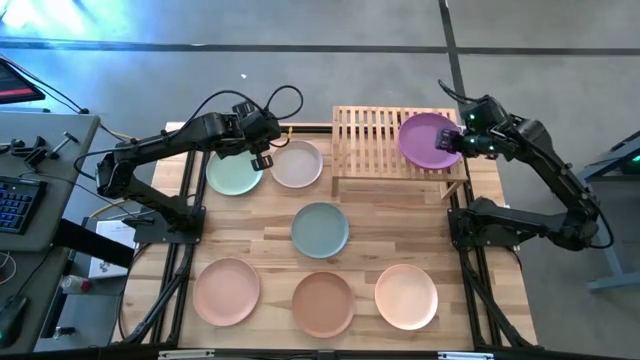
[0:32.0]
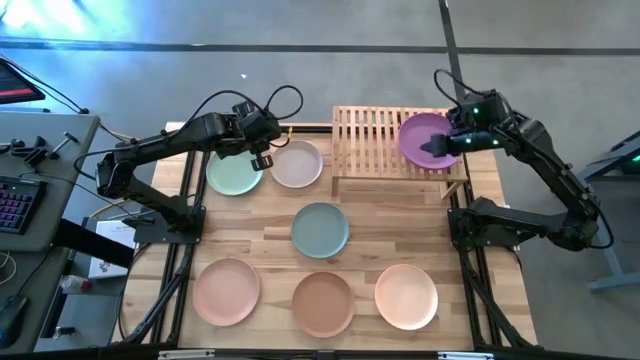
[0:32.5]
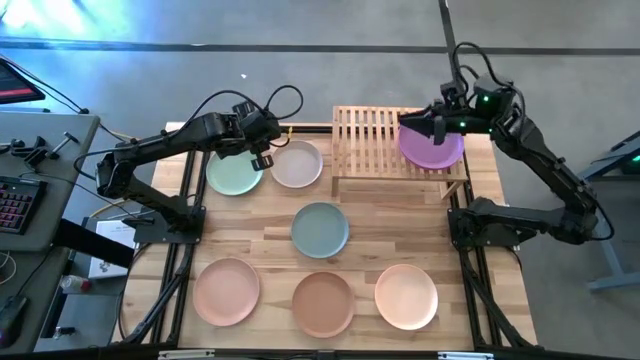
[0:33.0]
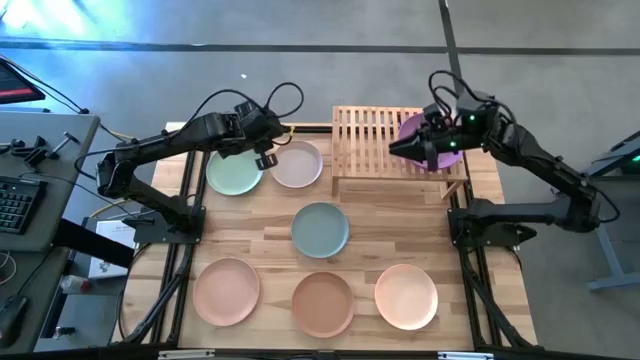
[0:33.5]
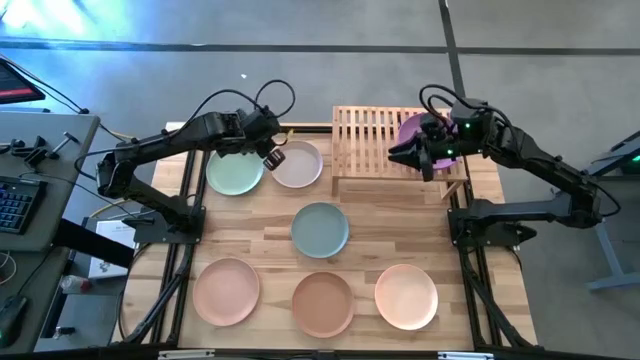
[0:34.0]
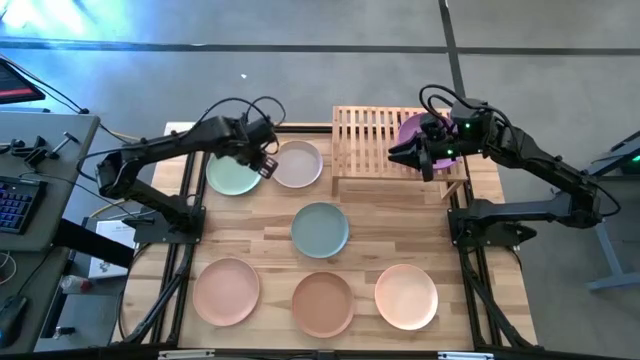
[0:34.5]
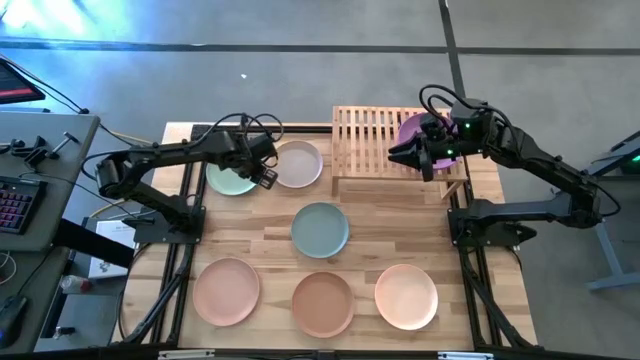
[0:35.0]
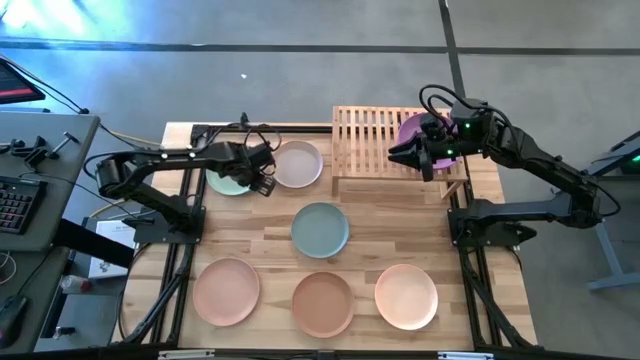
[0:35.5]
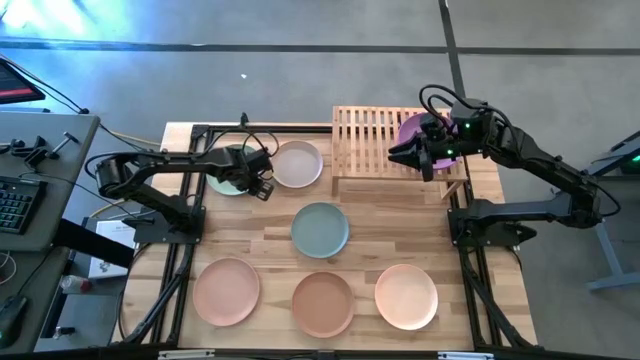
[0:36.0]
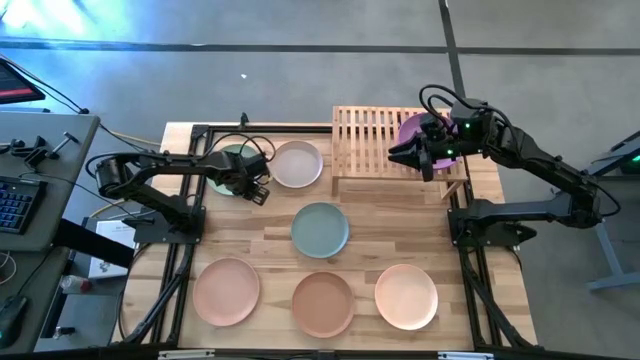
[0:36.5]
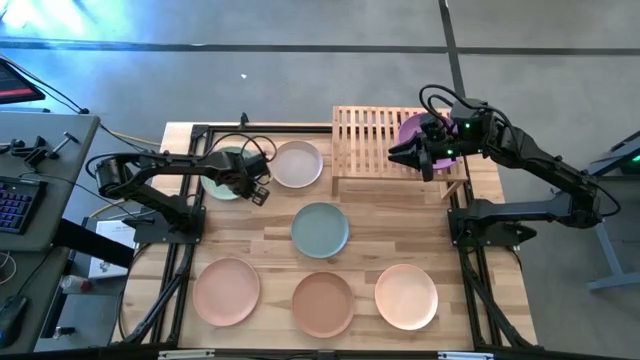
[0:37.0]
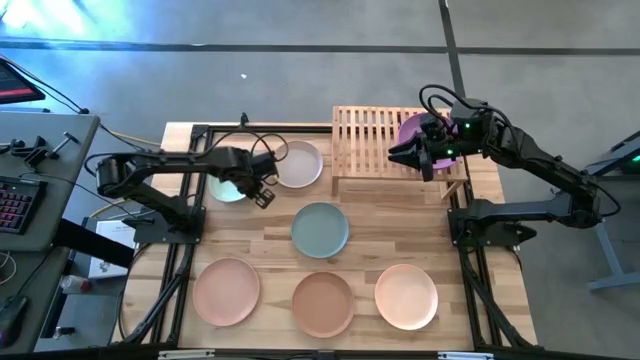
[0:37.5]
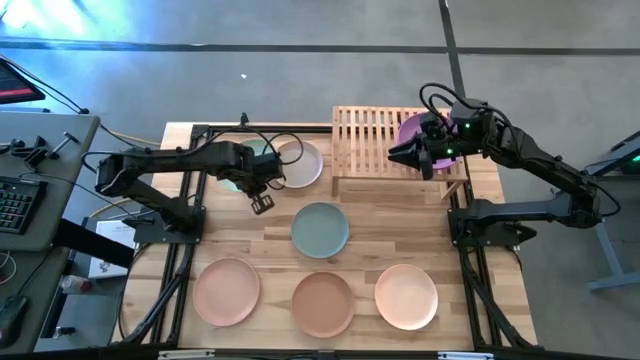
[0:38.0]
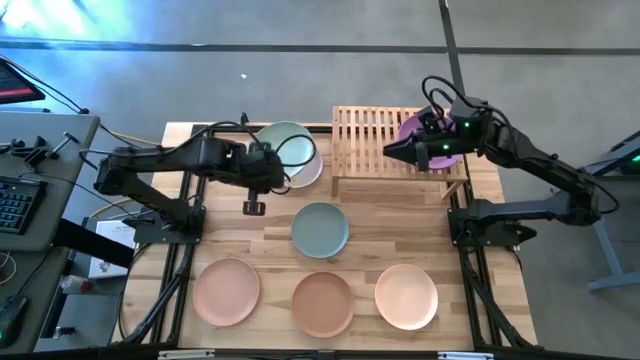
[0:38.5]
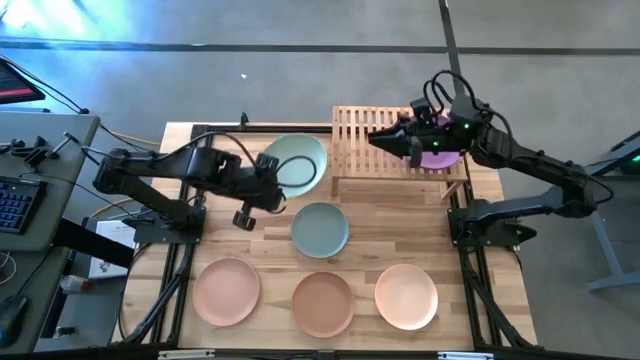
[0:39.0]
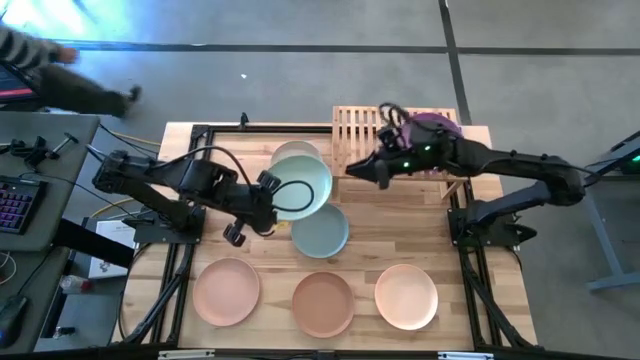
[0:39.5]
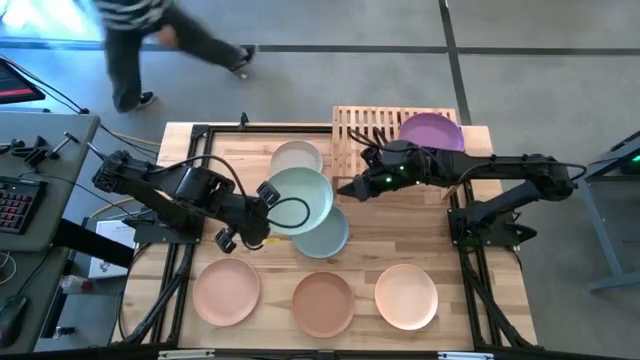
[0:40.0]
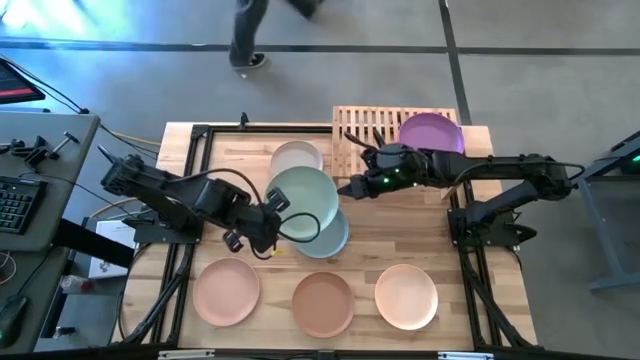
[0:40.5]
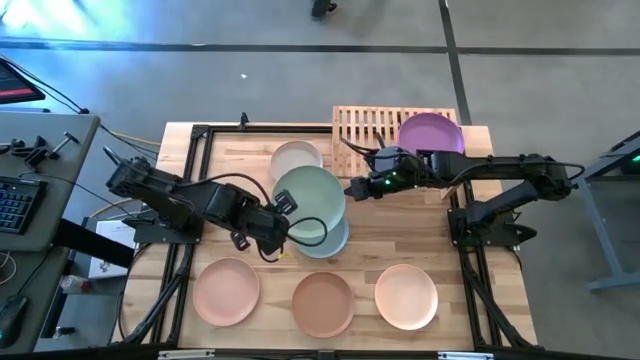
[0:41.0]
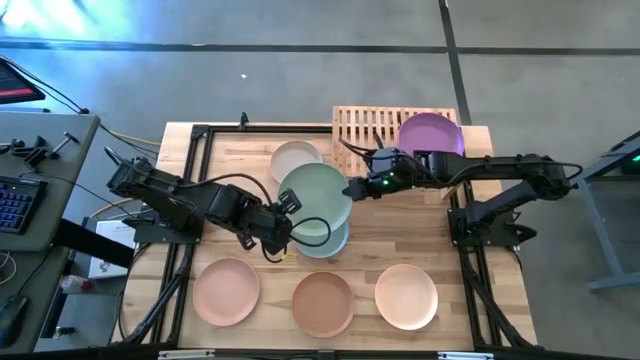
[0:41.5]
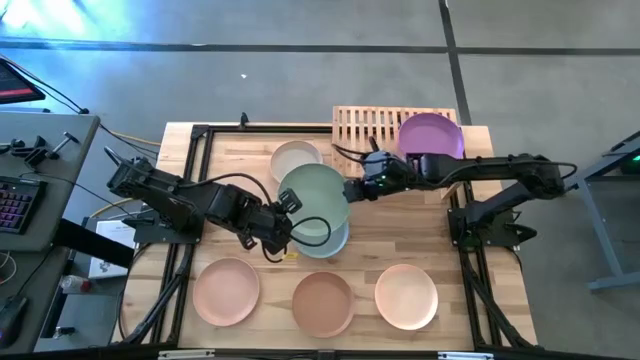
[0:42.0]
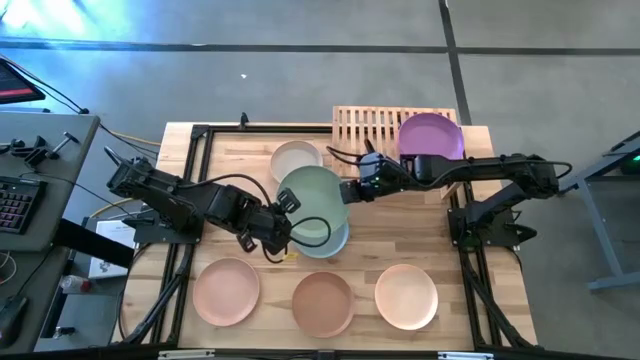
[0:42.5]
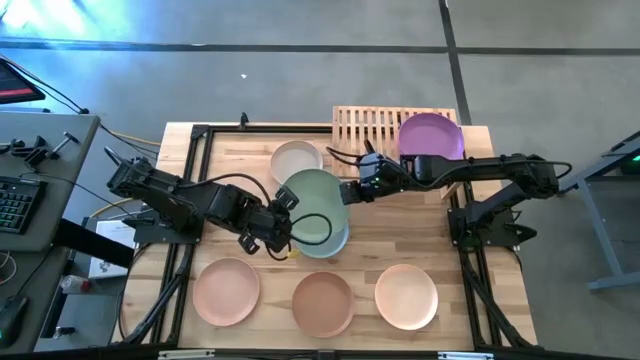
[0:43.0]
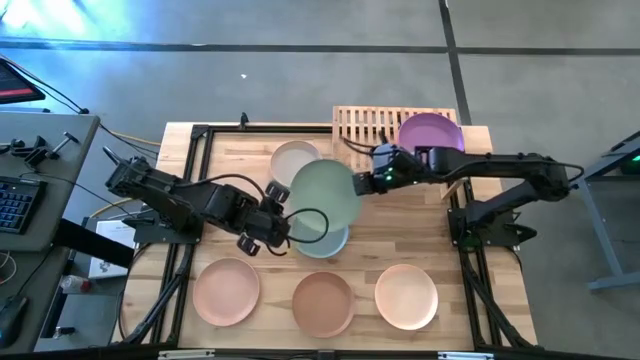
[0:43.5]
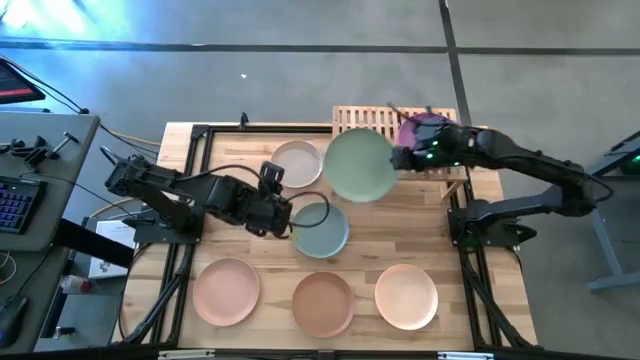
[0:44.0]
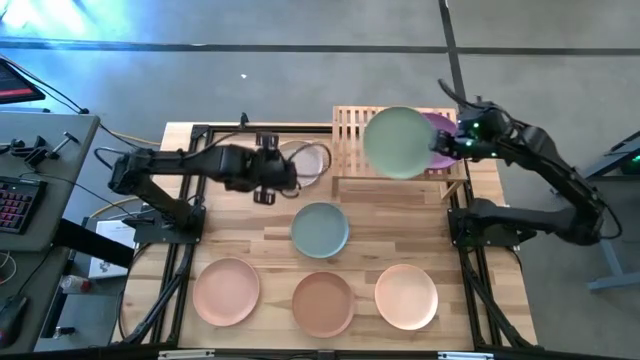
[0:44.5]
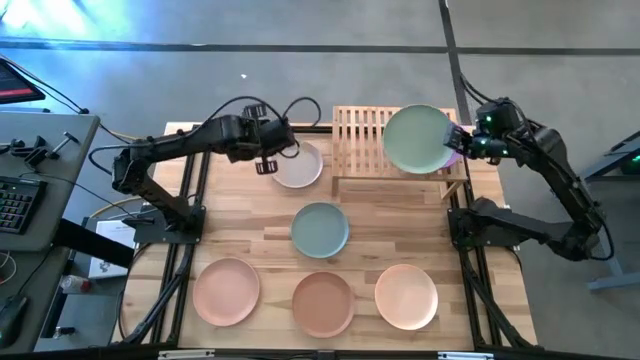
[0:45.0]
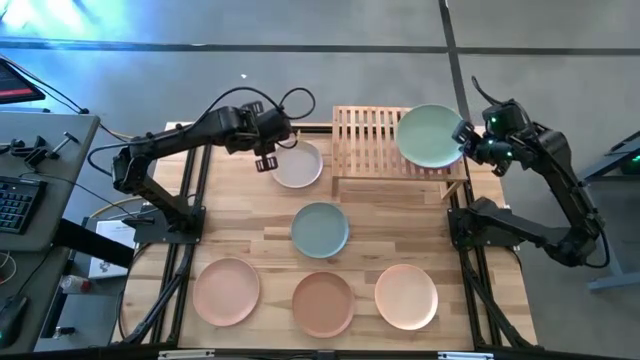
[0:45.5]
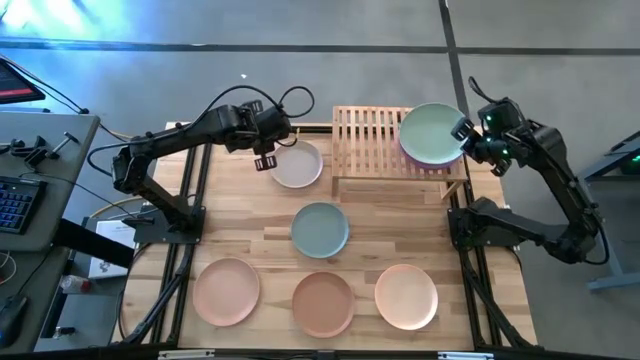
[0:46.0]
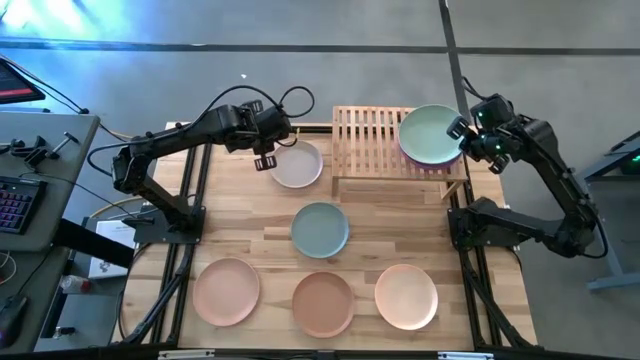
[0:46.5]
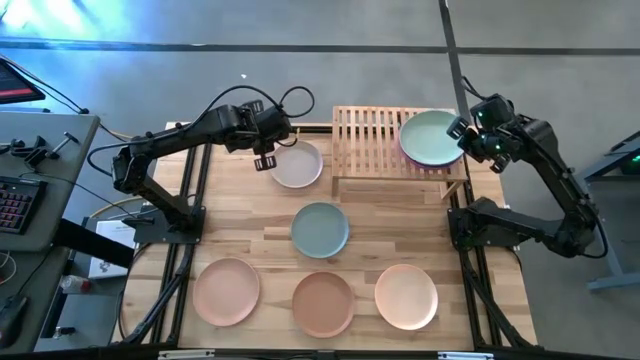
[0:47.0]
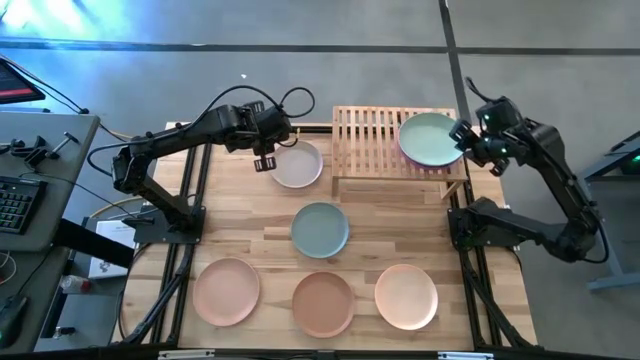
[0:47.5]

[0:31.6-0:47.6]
Task: Place and stack plates onto a shelf
Stack the green plate on the purple plate on the shelf
